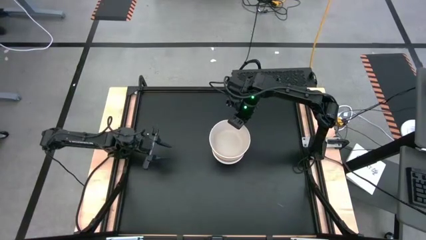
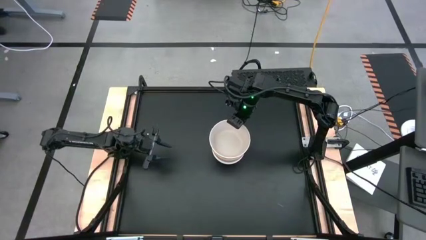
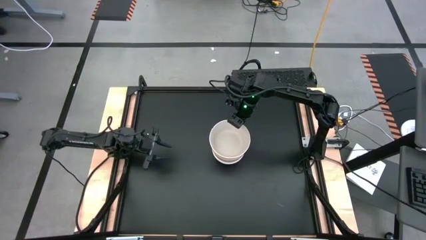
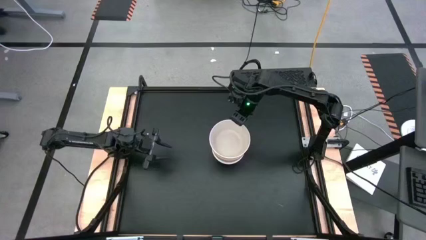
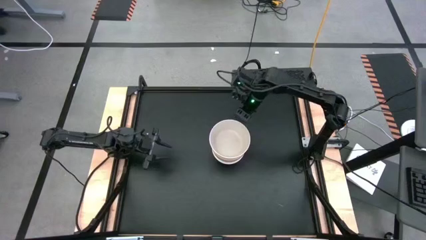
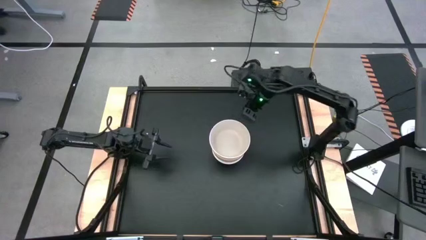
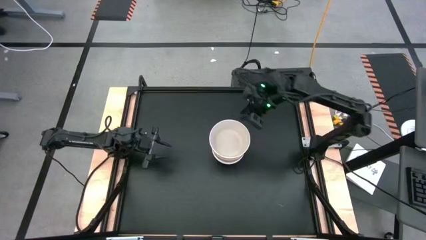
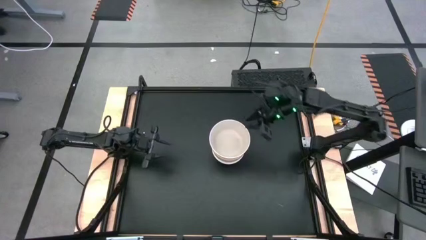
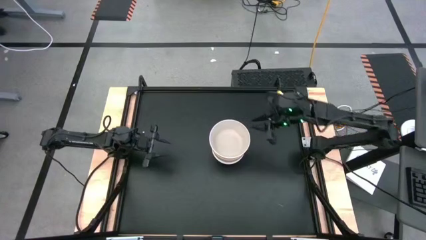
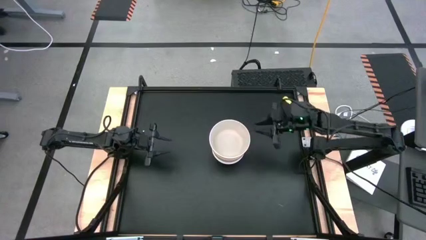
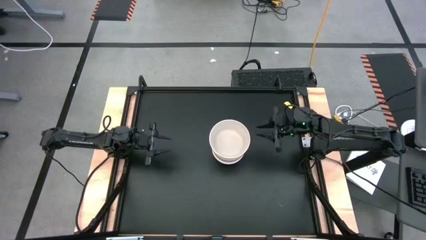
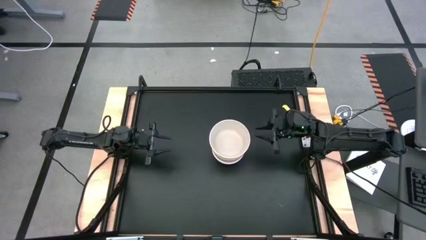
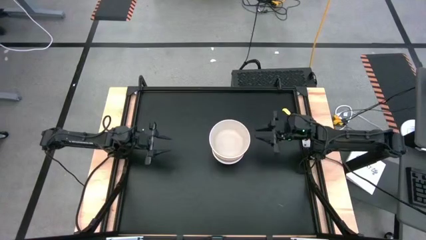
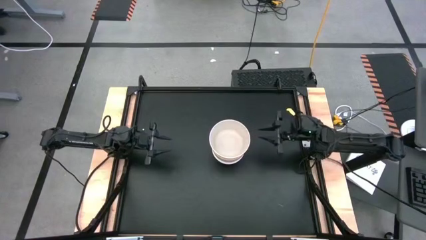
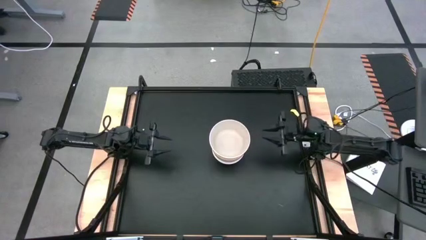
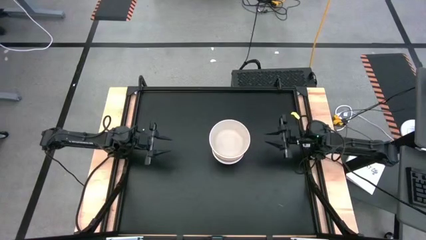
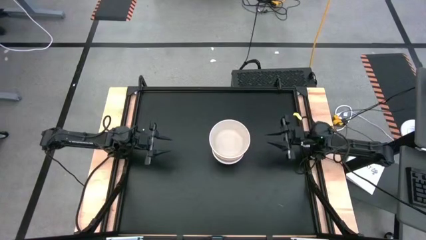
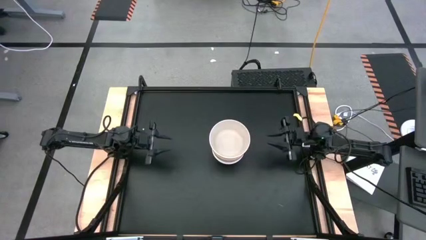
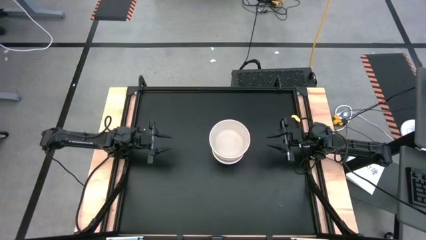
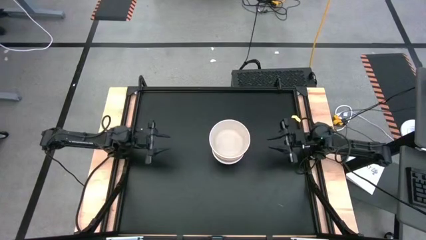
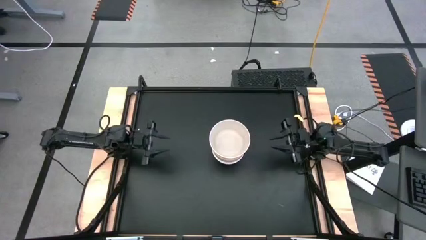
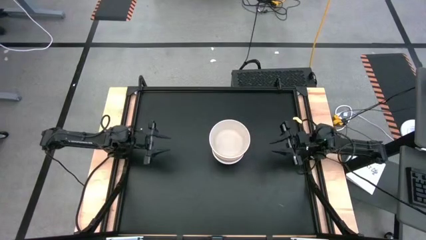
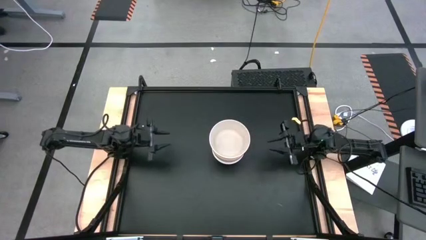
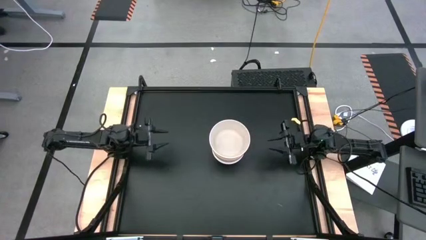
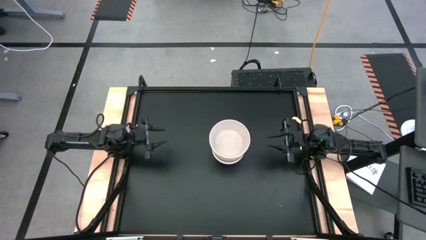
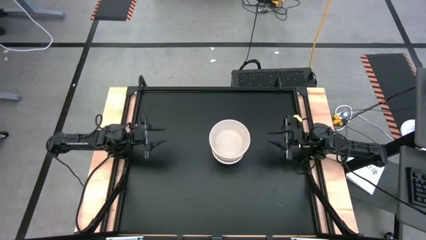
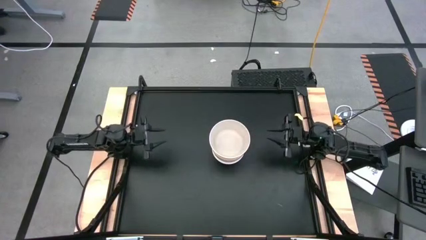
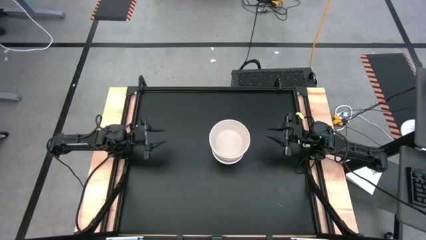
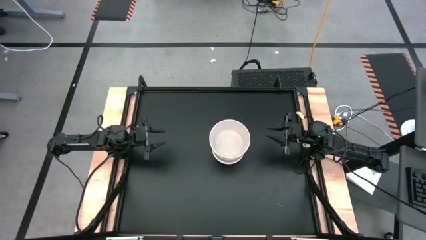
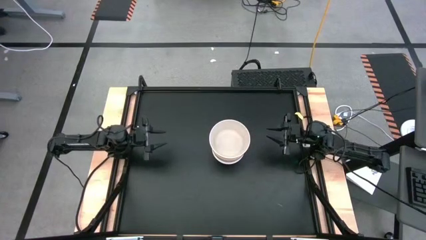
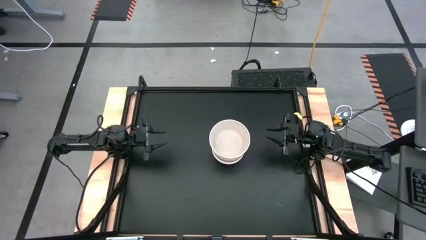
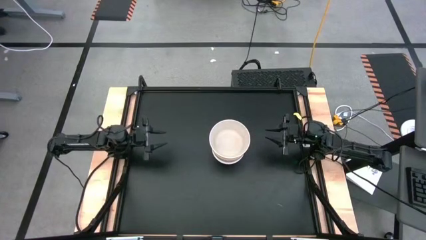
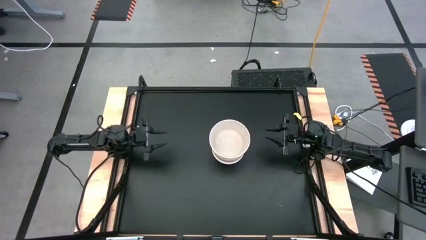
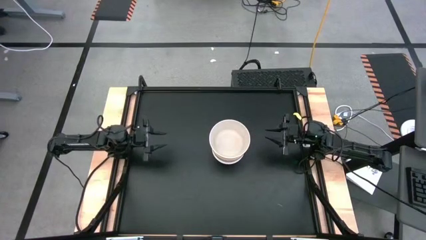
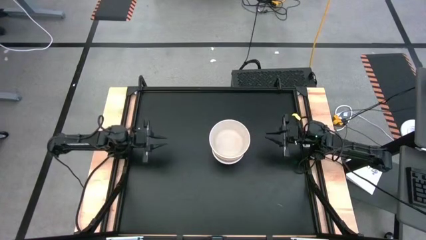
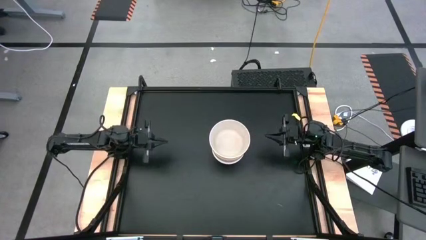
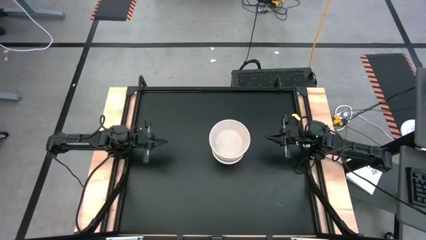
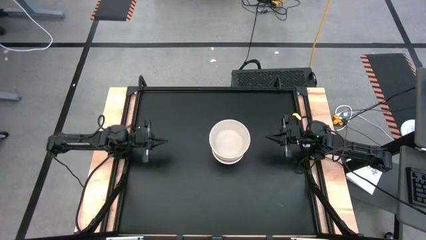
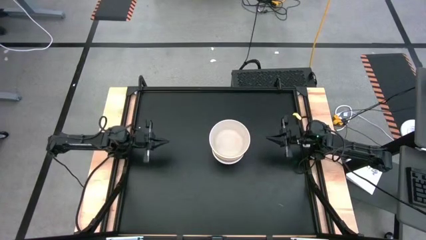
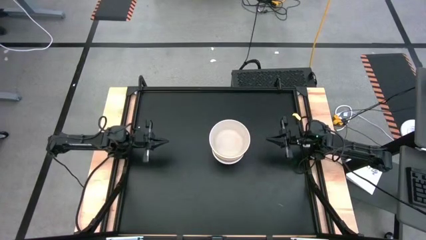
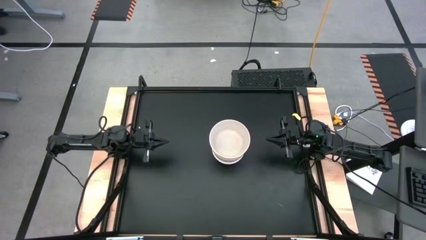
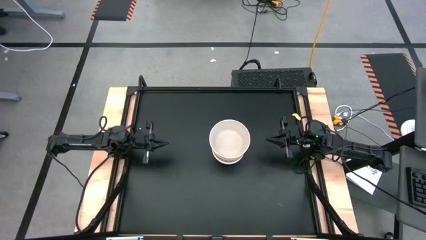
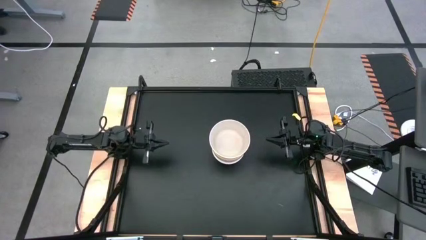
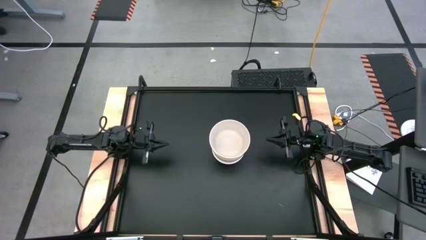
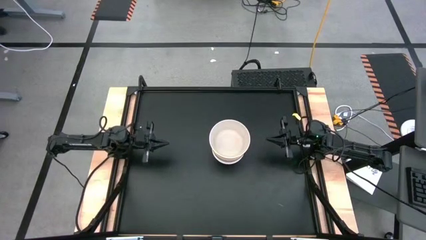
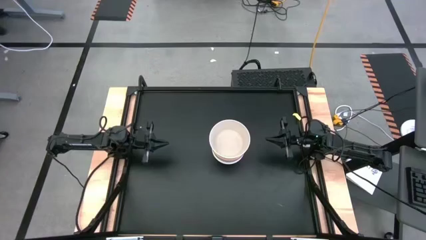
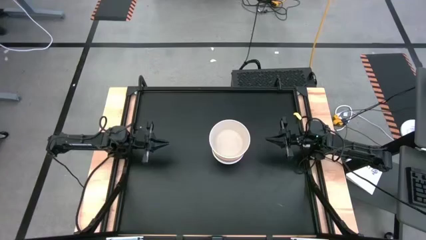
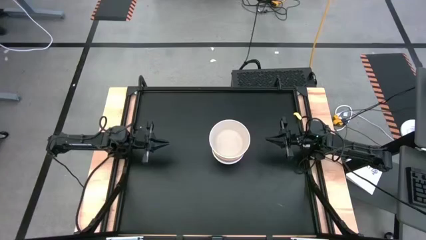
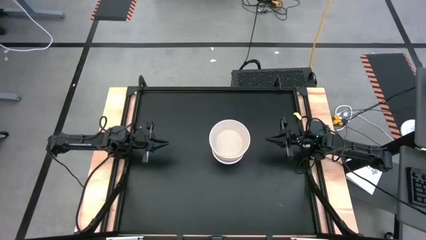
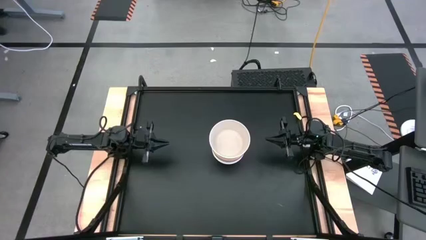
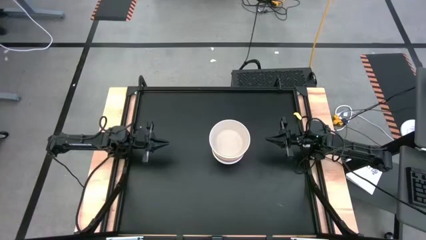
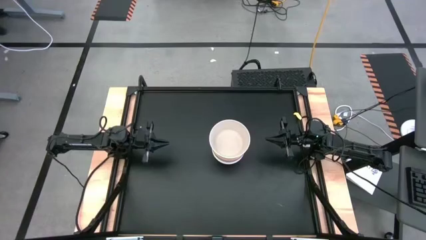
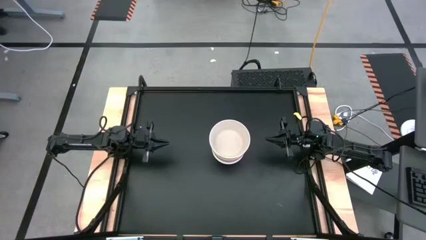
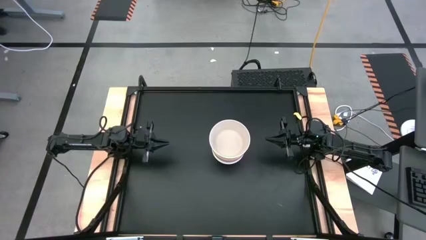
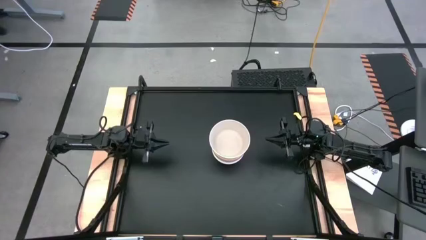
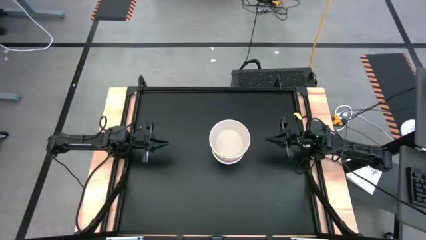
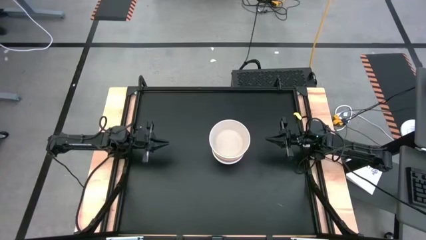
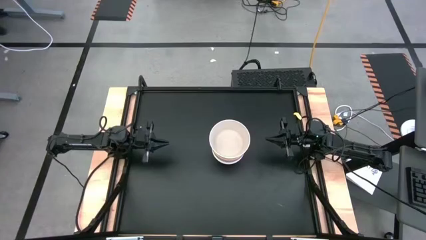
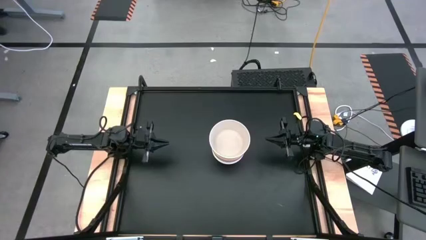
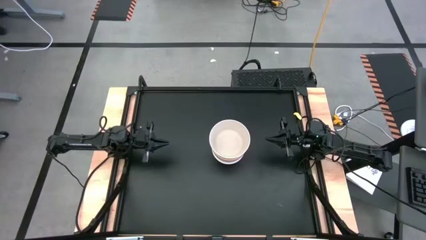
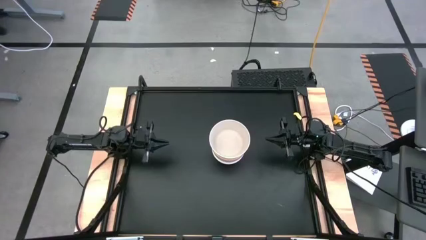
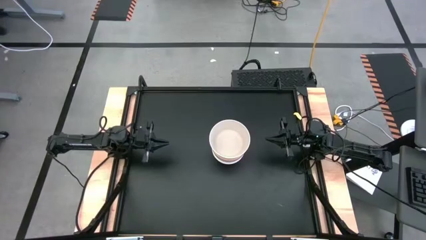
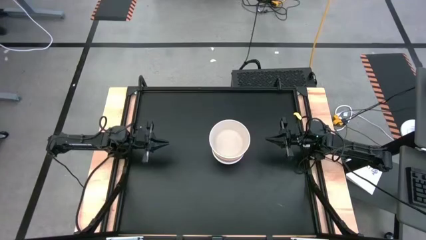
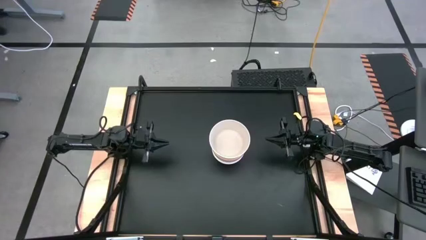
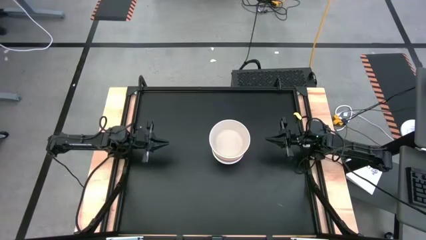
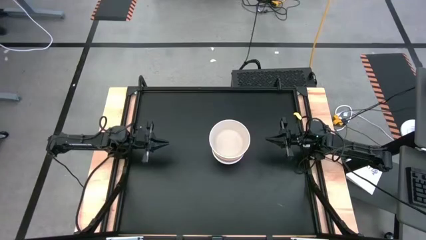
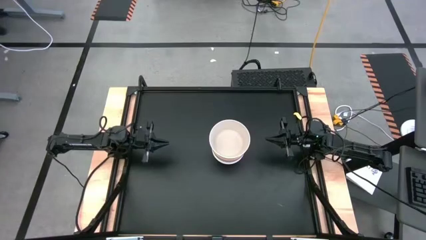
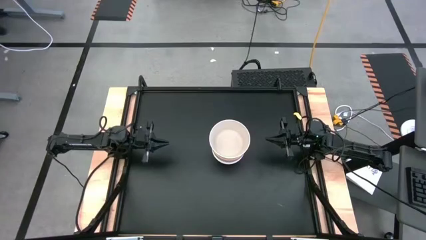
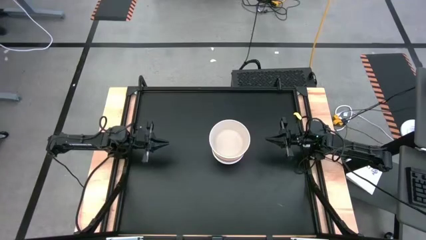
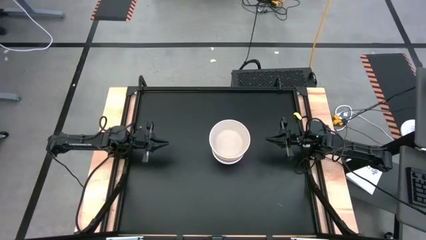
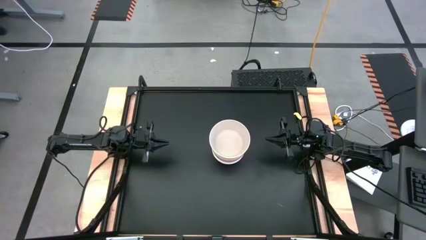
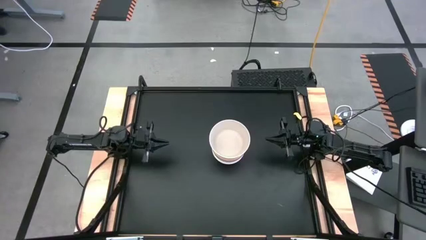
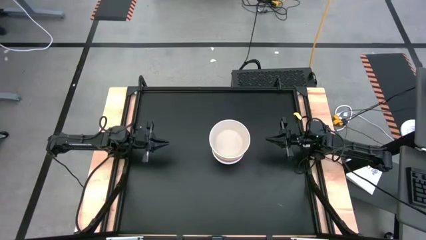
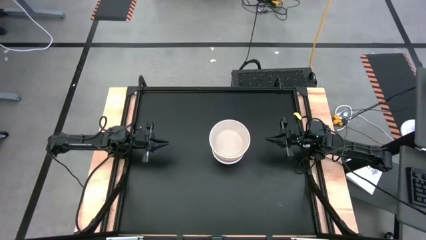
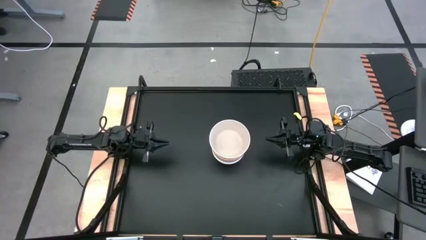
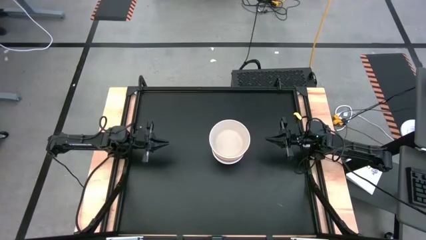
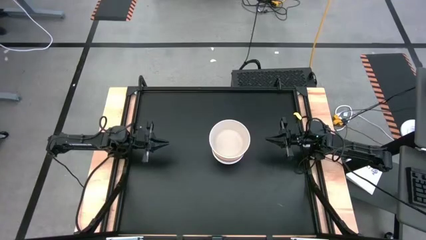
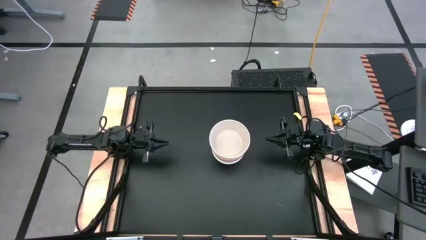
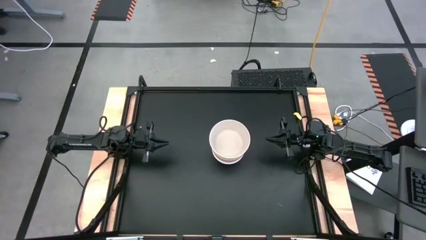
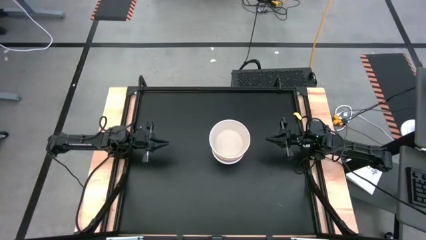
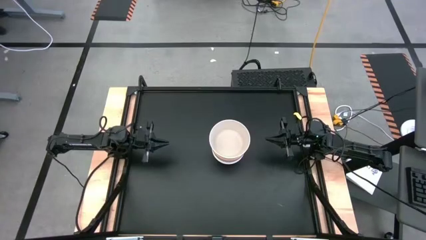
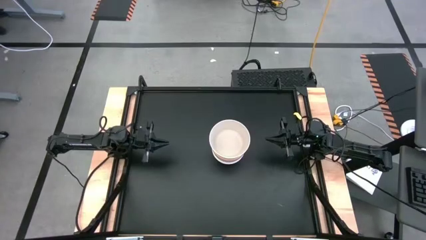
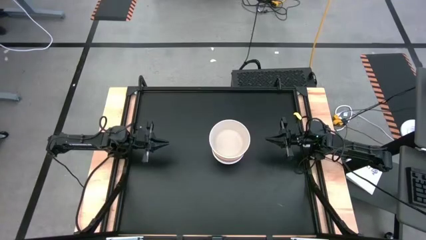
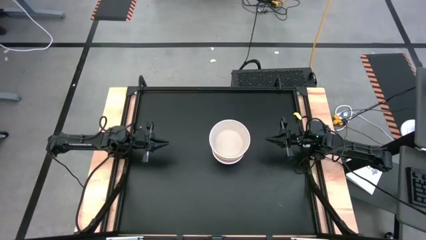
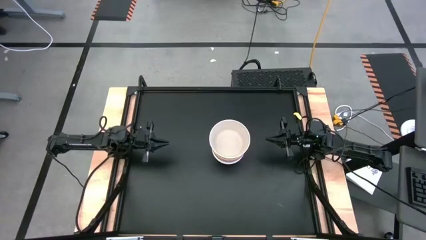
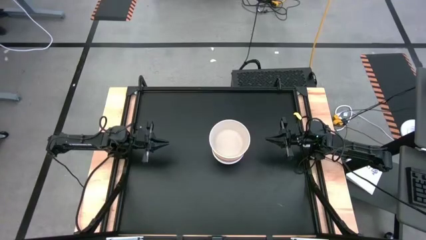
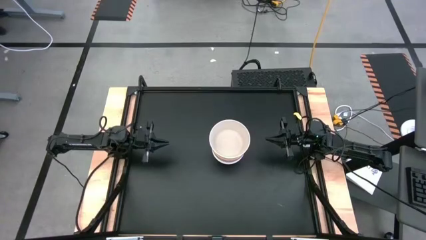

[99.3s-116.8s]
Task: Nest bowls inside each other
Return to Home Position
